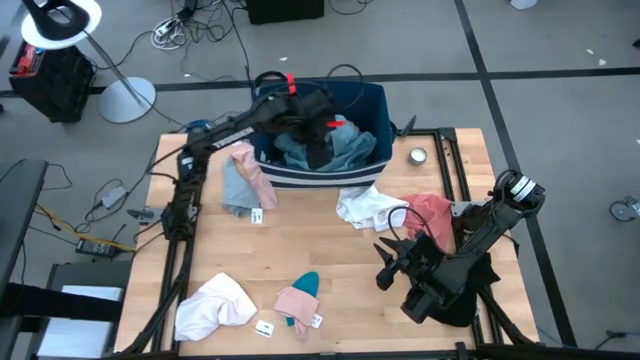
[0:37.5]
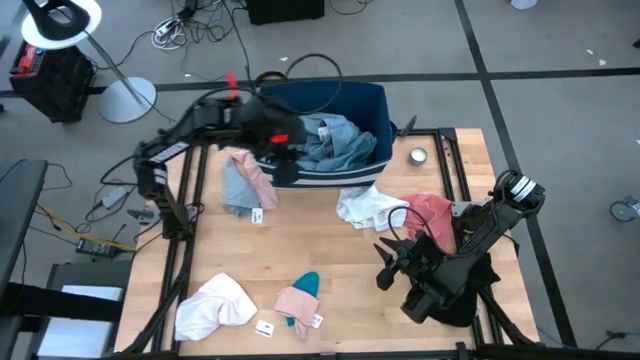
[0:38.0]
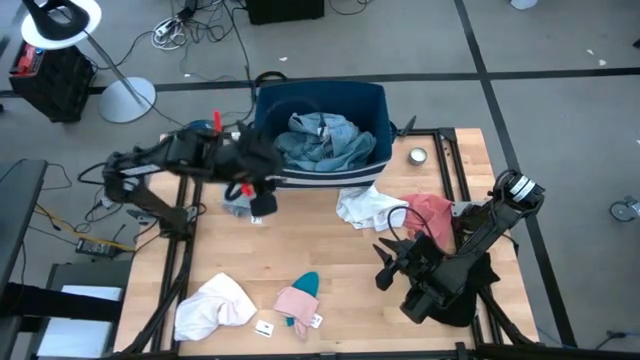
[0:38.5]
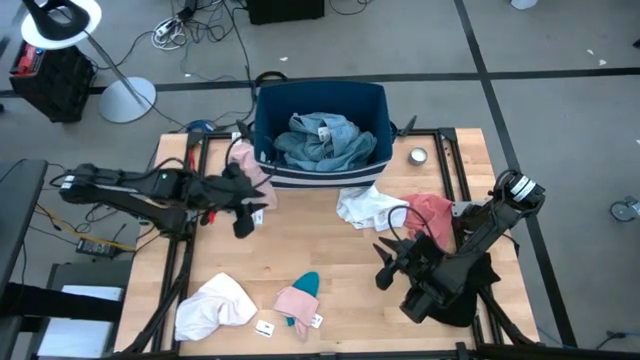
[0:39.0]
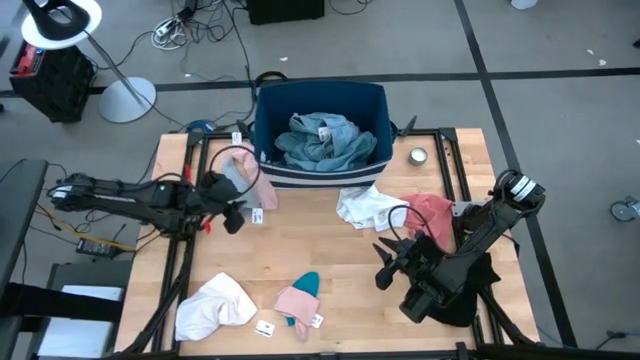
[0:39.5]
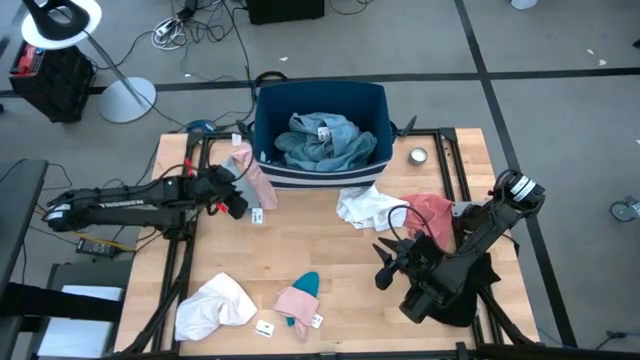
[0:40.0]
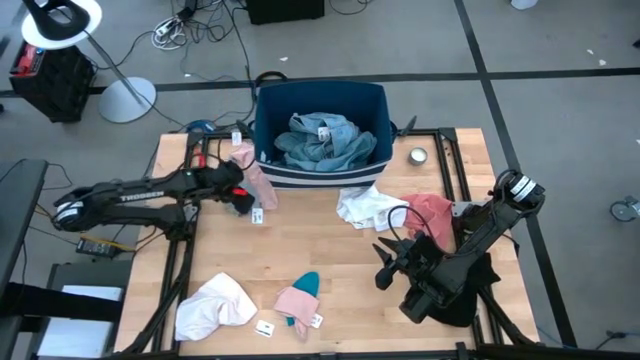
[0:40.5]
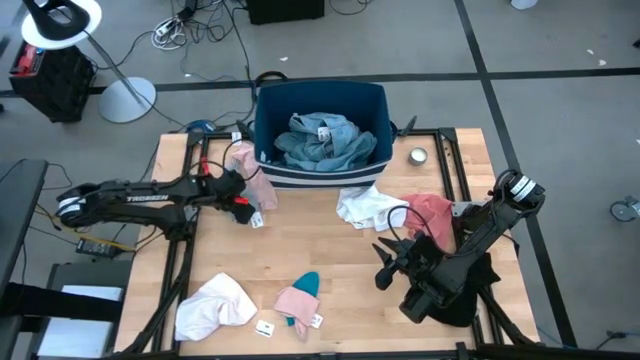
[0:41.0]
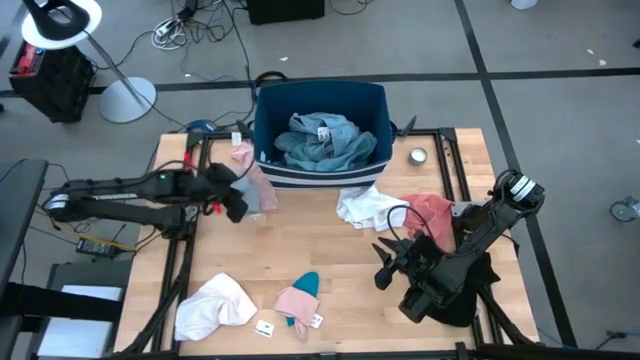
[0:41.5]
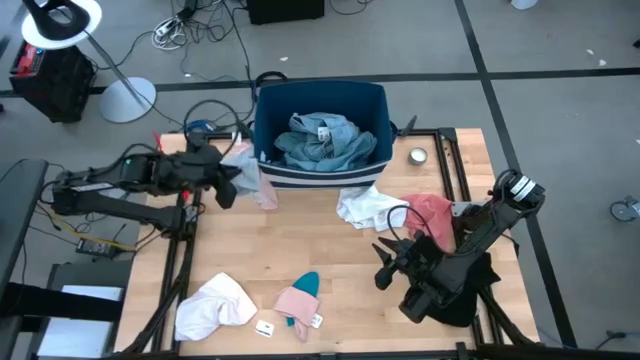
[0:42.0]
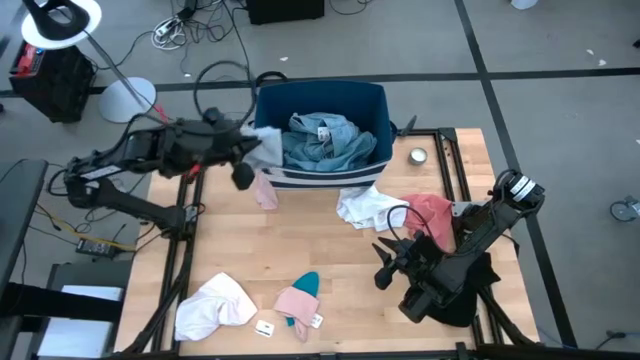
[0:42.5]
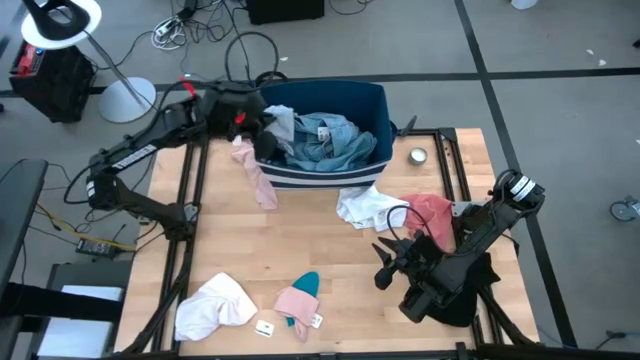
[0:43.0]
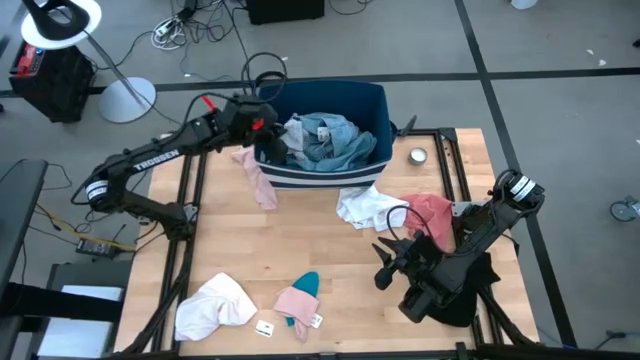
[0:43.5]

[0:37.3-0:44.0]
Task: Sort clothes
Put the gray short pants into the blue laundry bin

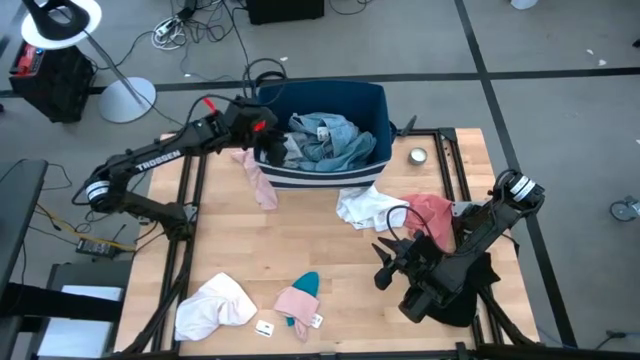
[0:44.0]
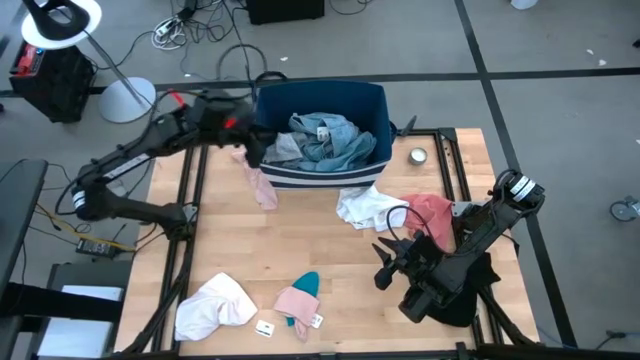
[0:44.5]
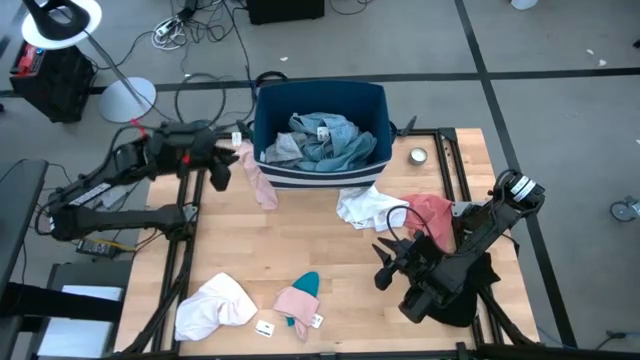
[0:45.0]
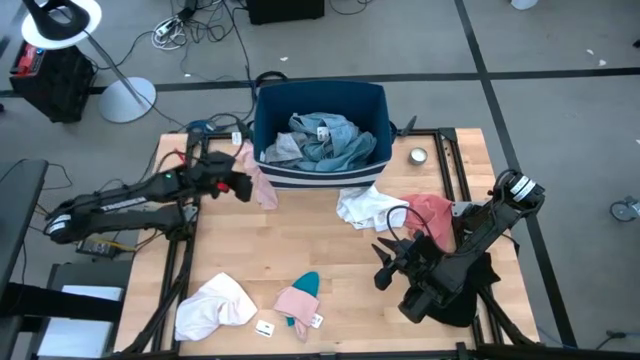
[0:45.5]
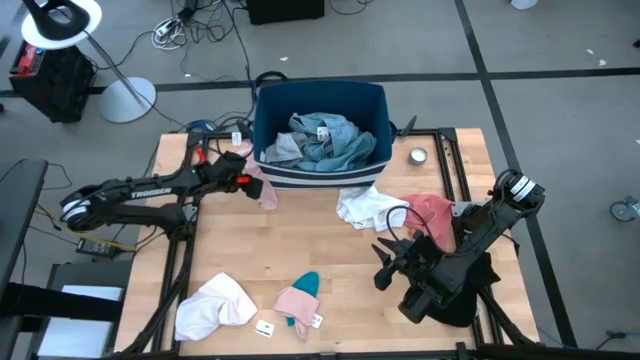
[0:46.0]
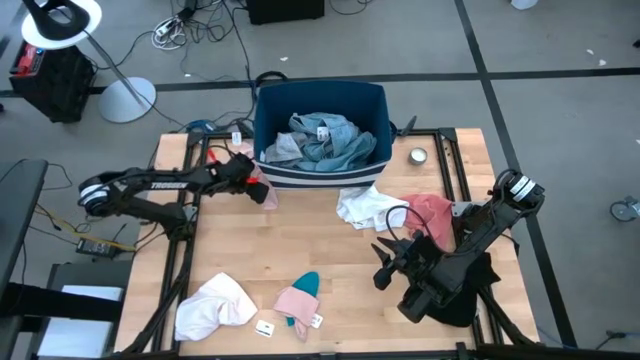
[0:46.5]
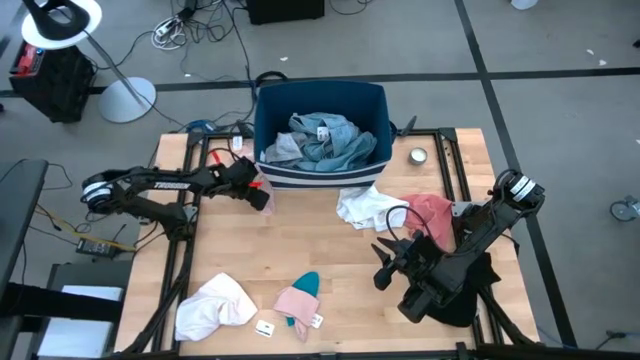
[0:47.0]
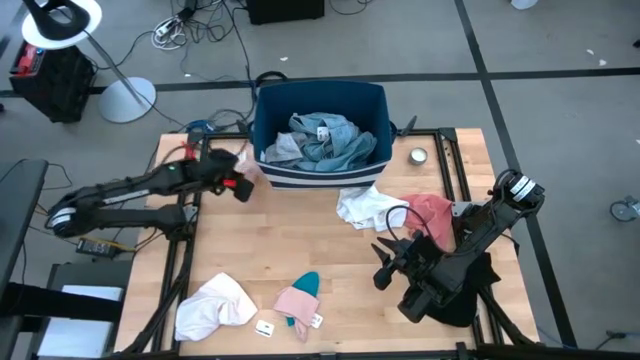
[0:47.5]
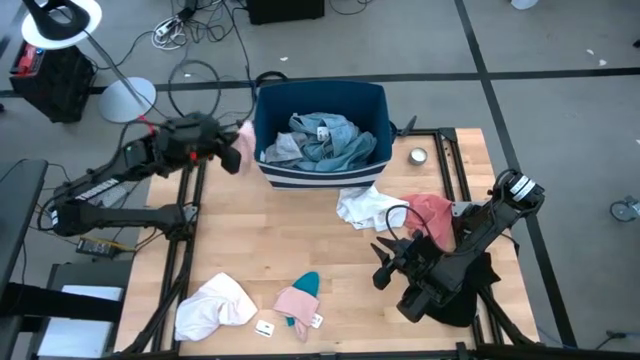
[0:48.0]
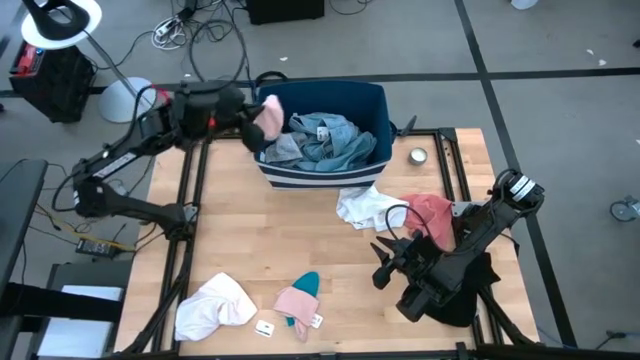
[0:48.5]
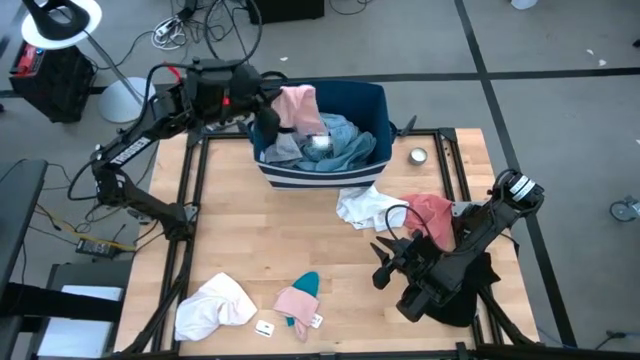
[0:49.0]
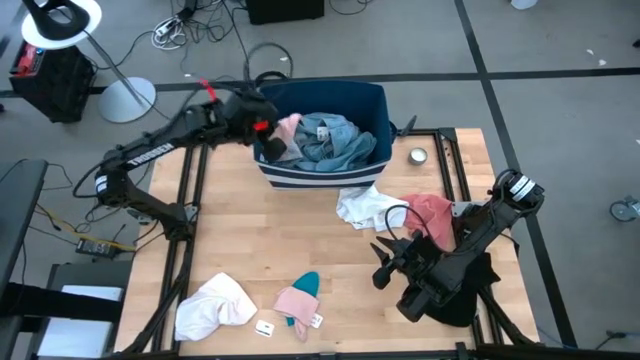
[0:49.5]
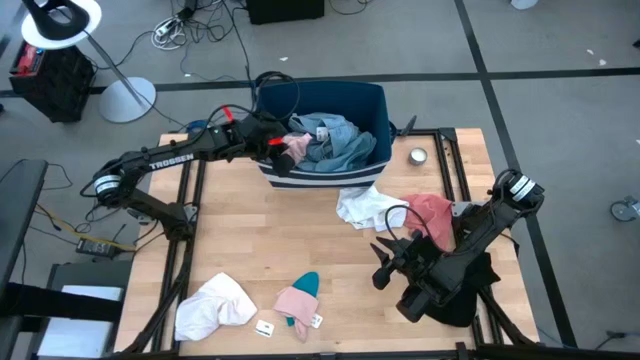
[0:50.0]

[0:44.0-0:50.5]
Put the top pink sock into the blue laundry bin

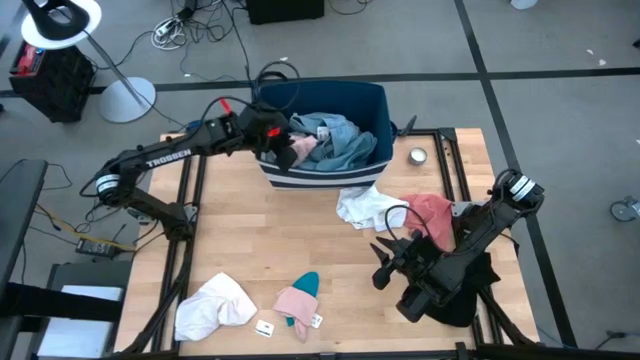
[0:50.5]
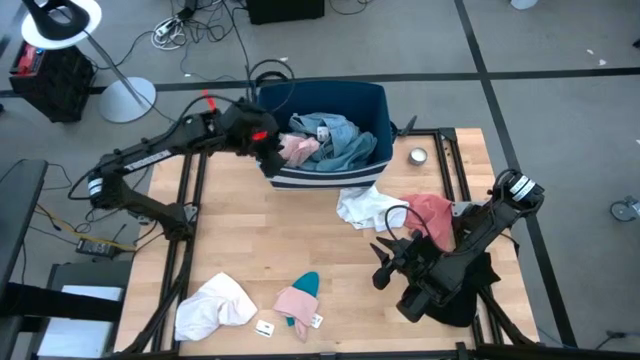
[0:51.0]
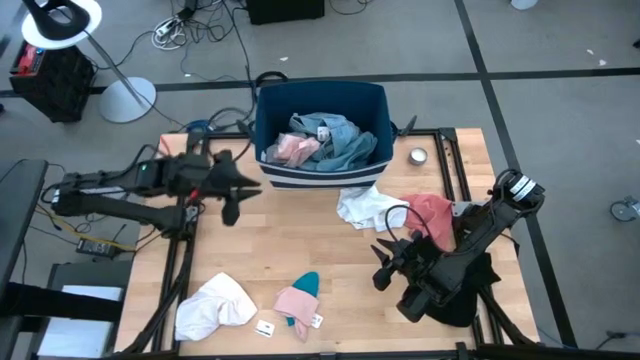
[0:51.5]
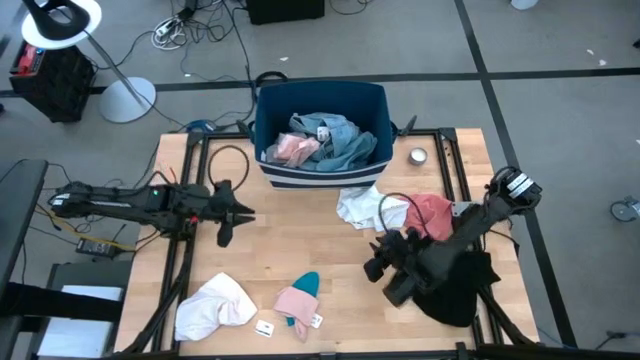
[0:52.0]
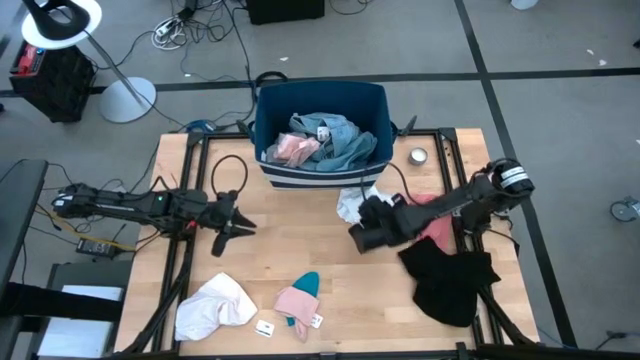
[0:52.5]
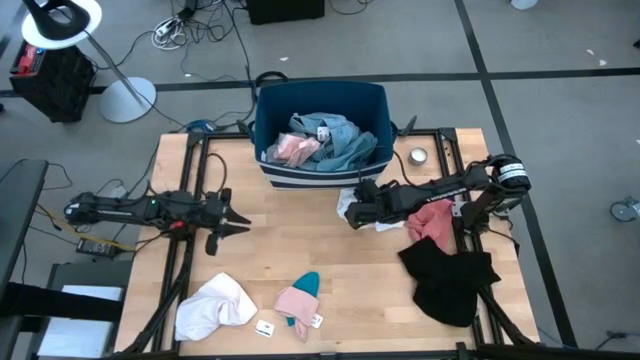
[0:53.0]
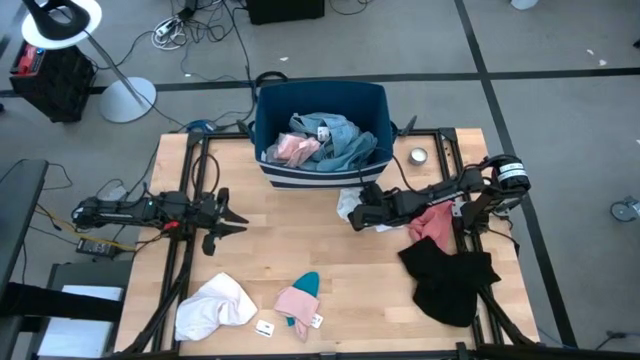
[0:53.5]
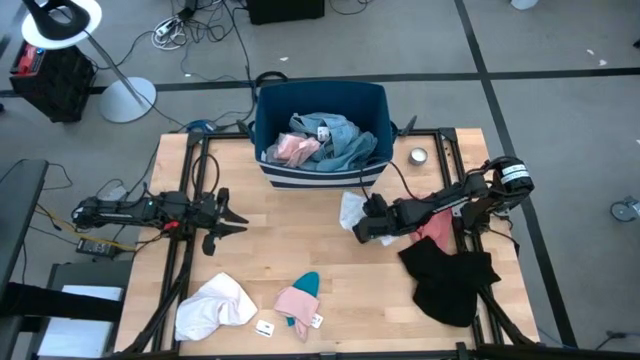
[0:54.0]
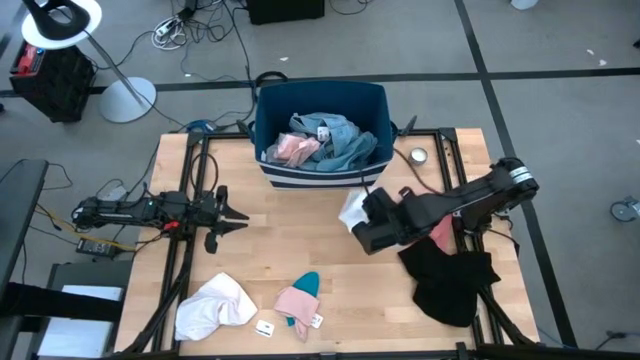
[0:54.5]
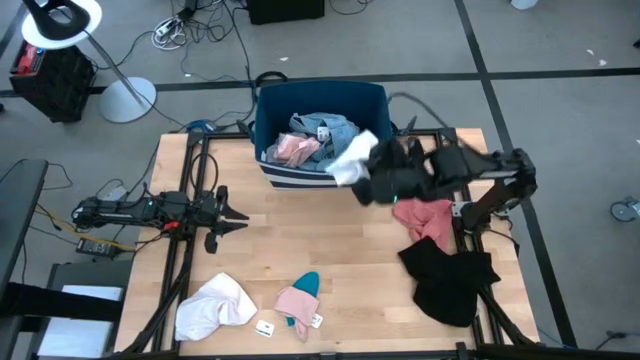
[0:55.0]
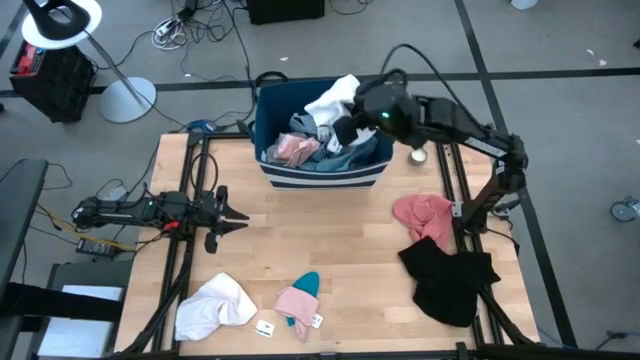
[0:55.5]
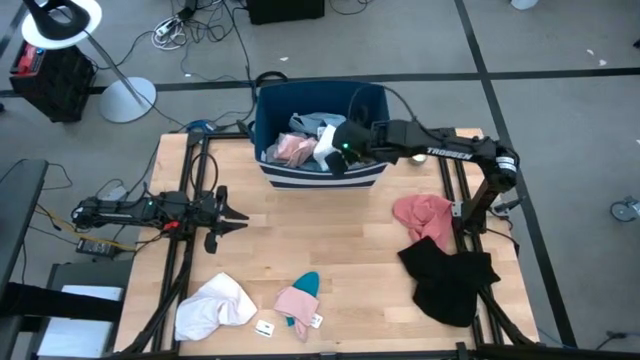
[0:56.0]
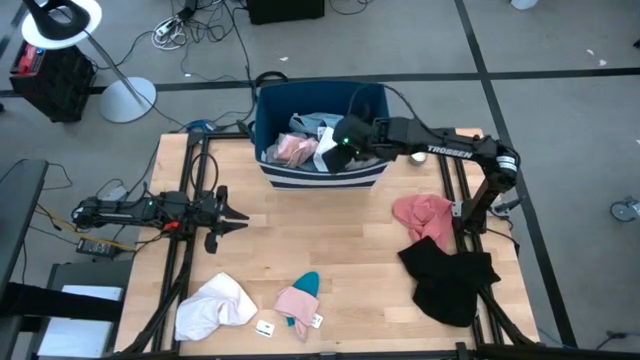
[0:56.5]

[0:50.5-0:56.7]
Put the white shirt into the blue laundry bin

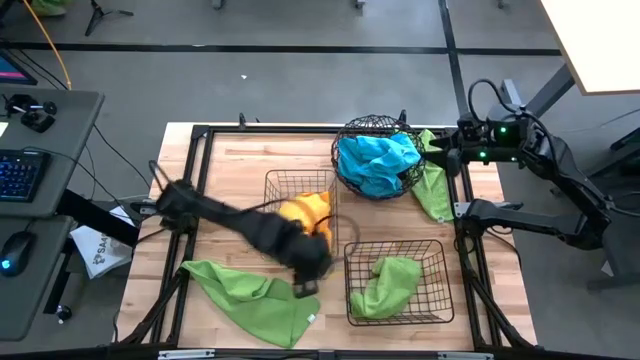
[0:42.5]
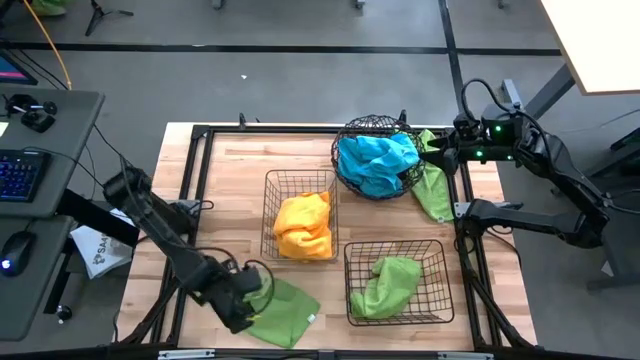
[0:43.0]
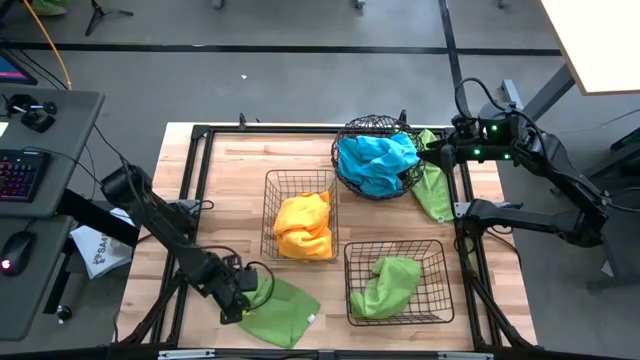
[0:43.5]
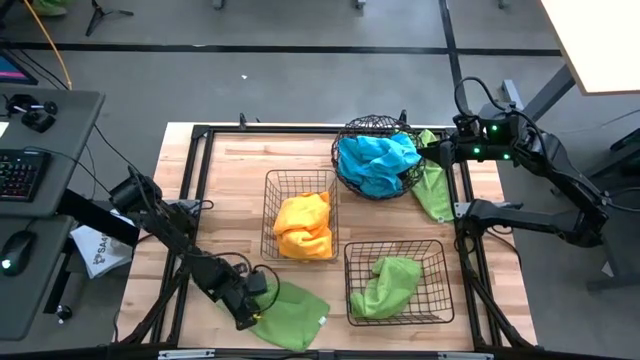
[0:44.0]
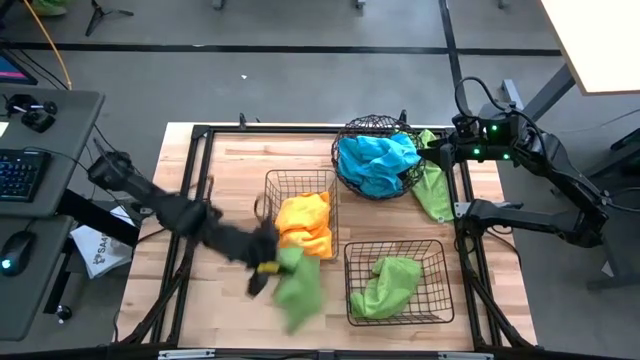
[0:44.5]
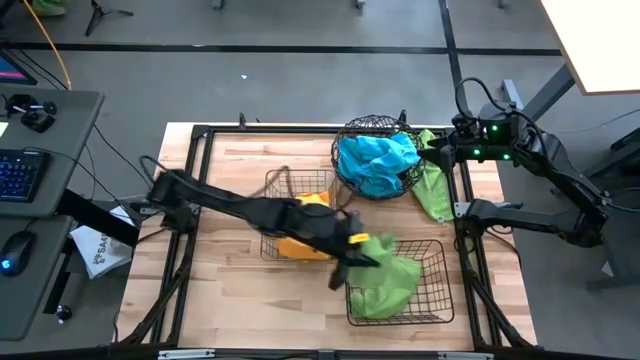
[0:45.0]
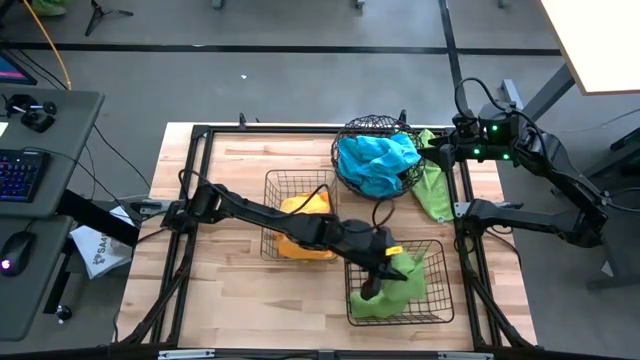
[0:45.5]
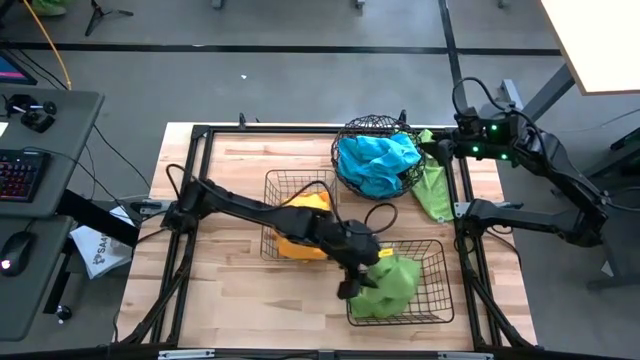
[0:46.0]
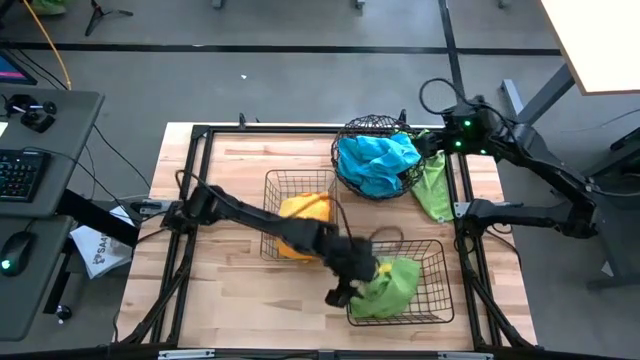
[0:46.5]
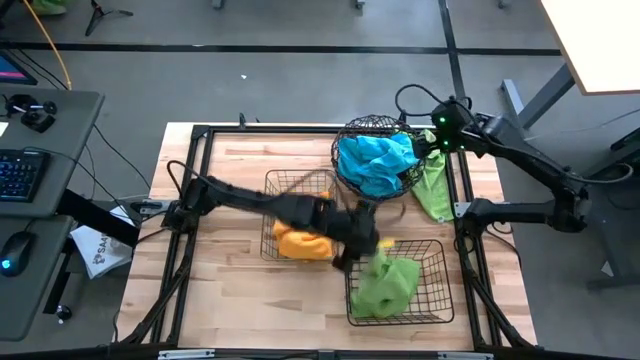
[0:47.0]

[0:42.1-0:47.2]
Task: Sort microfiber towel by color & place in baskets
Put the bottom green microfiber towel into the bottom right black metal basket
